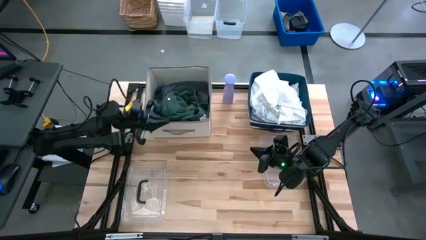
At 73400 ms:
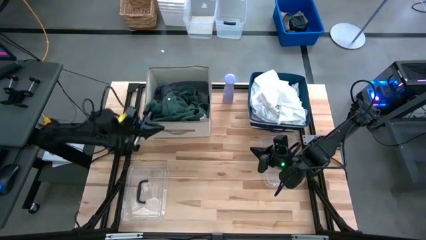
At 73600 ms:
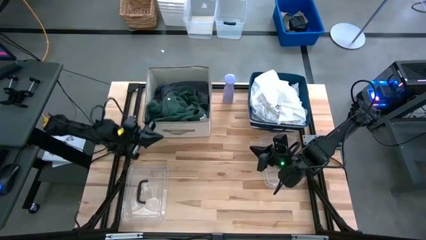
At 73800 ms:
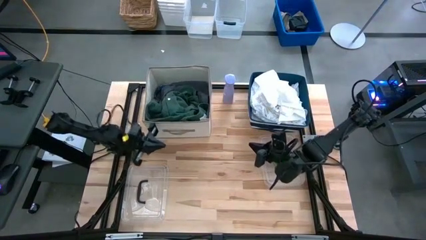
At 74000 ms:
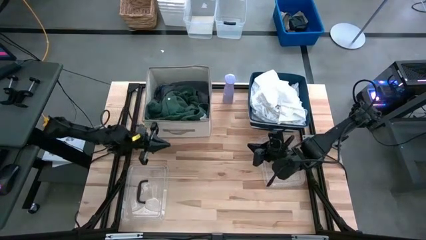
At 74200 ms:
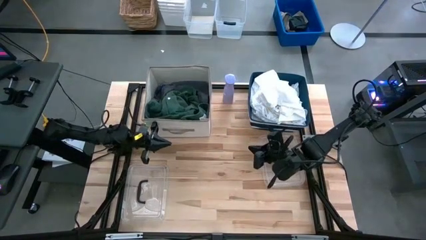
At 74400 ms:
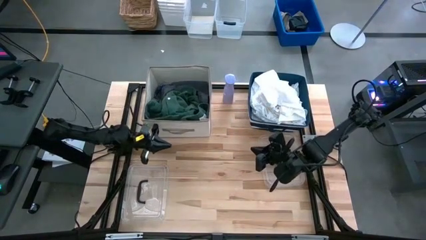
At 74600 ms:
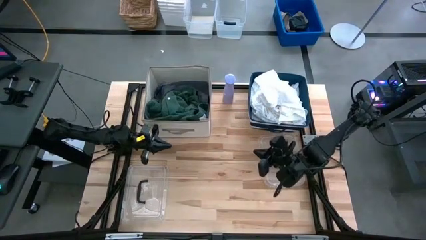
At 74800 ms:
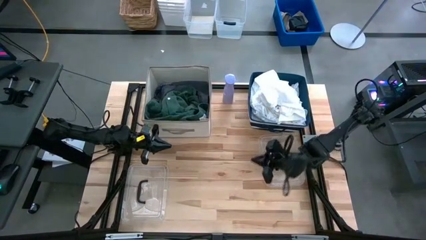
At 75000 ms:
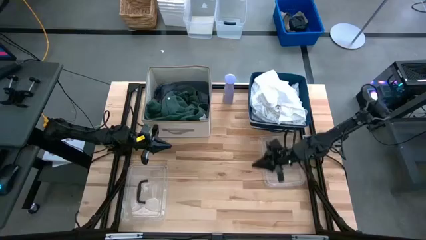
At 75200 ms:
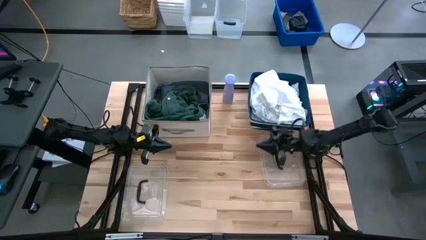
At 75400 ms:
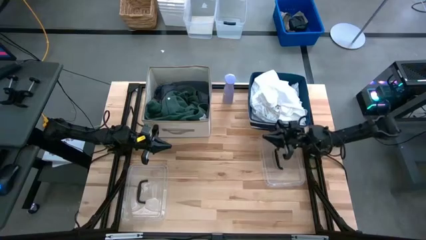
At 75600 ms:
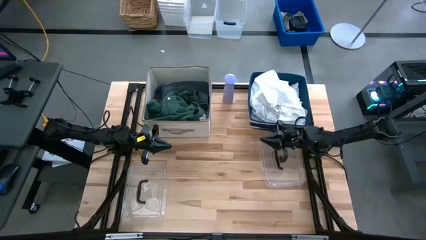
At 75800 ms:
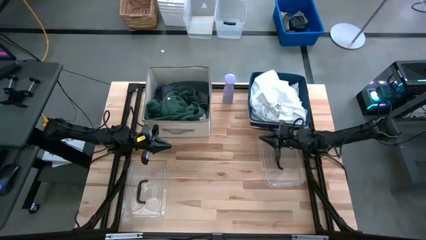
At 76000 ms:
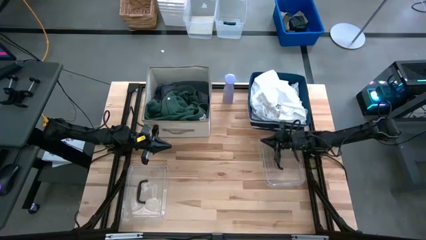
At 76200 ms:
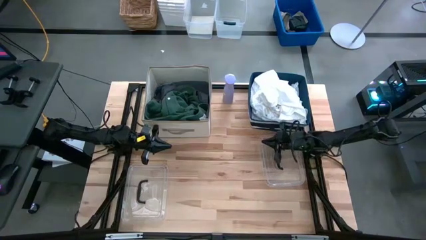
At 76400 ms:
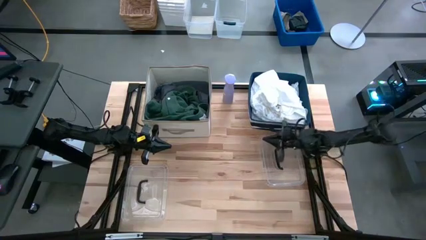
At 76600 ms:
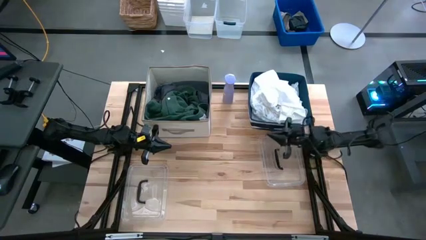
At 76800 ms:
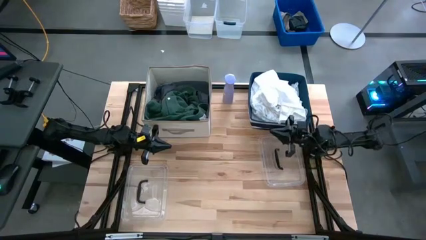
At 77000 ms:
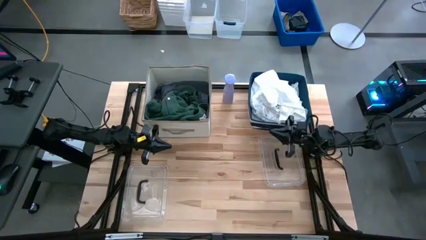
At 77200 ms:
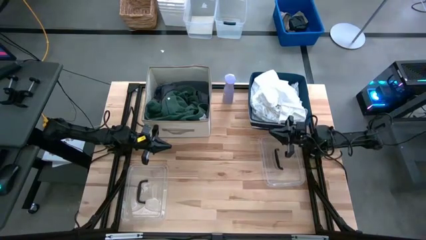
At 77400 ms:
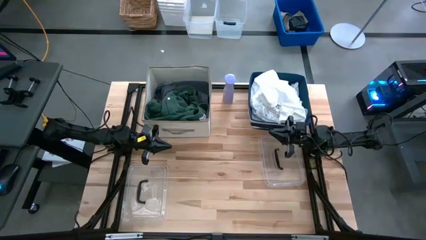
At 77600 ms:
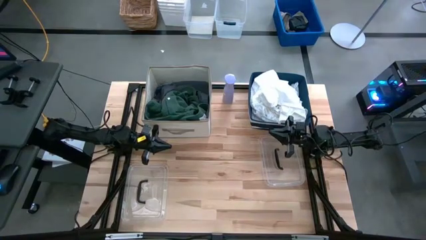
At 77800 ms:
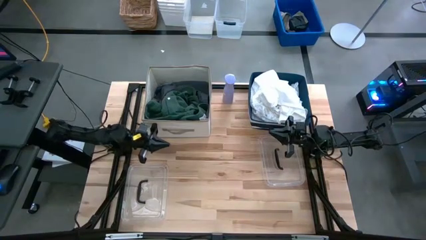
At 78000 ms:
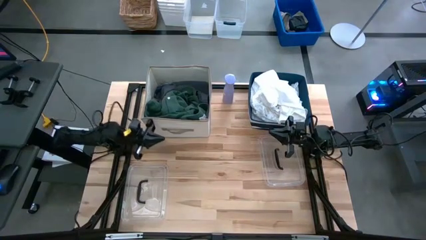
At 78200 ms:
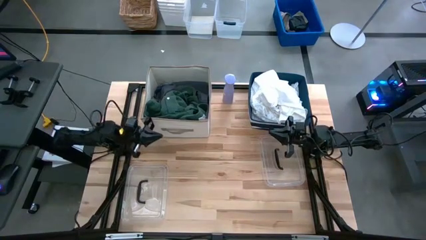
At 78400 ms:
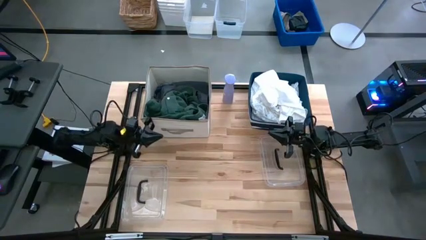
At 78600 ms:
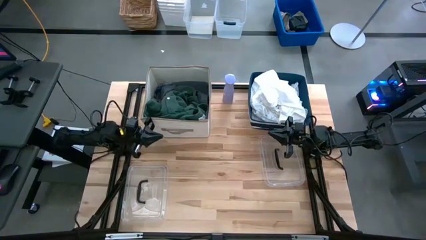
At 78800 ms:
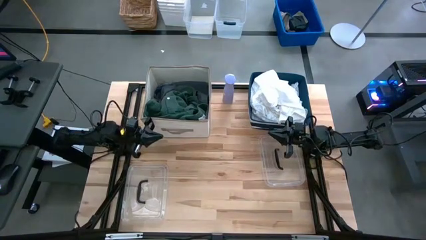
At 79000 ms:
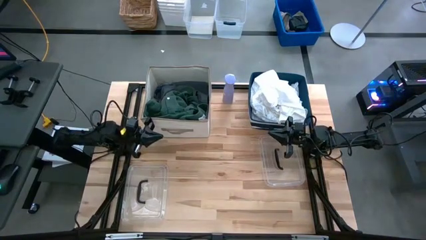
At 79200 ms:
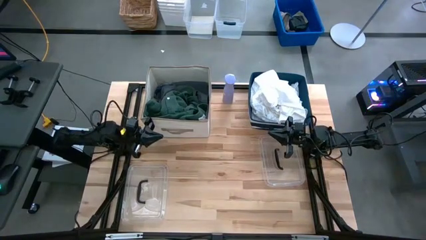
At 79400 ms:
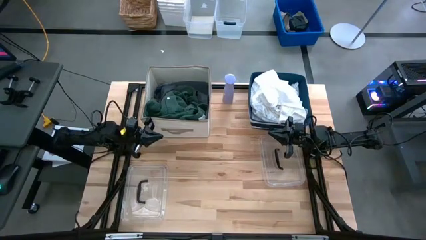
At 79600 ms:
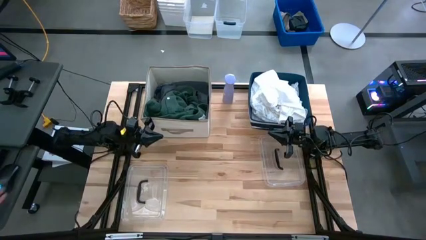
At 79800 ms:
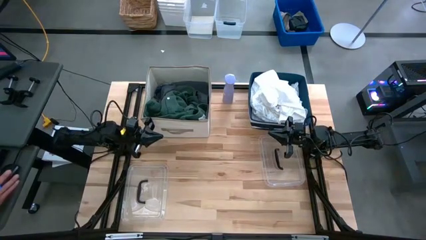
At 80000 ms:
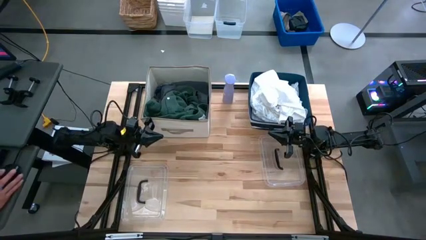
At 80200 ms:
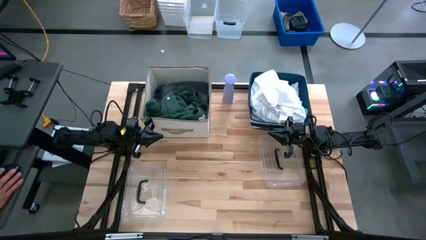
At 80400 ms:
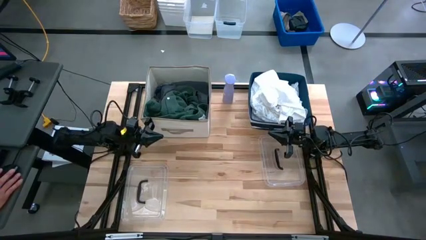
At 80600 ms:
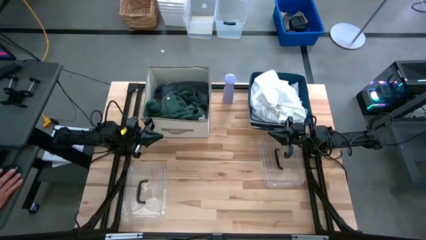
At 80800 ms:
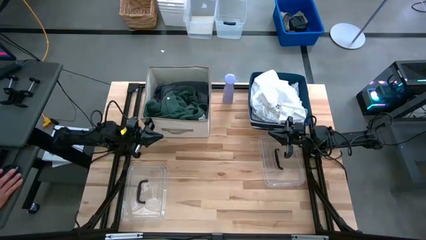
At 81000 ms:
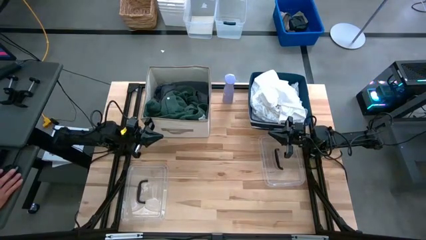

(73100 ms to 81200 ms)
Task: Sort clothes
Return to Home Position

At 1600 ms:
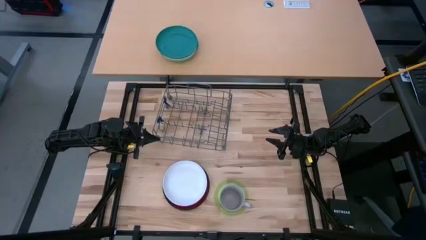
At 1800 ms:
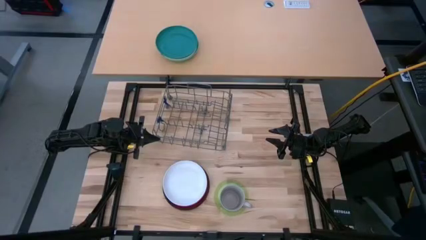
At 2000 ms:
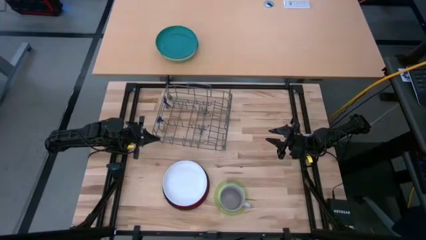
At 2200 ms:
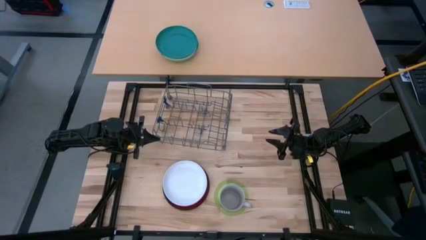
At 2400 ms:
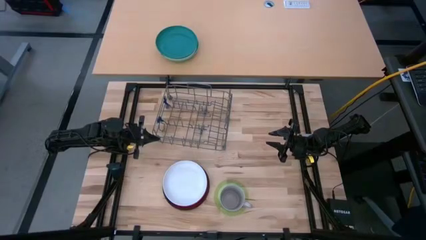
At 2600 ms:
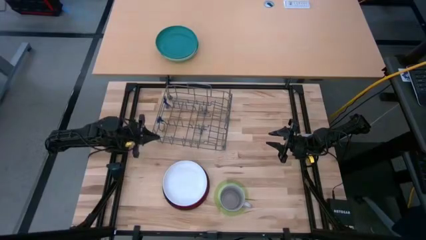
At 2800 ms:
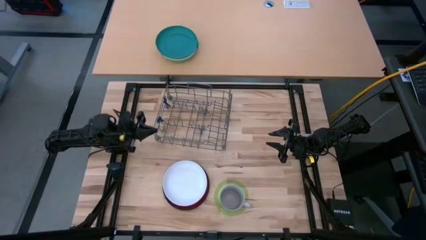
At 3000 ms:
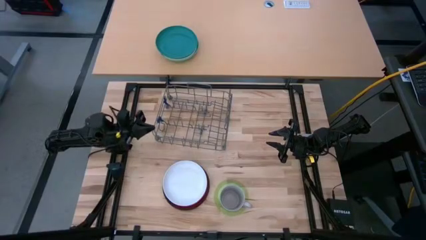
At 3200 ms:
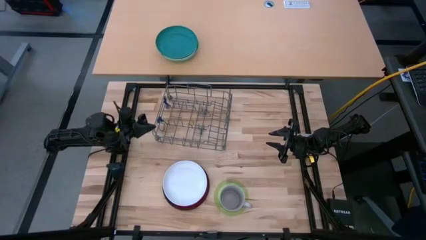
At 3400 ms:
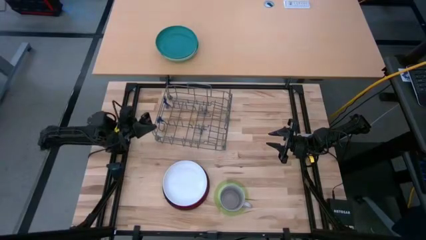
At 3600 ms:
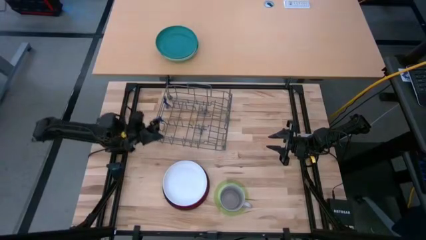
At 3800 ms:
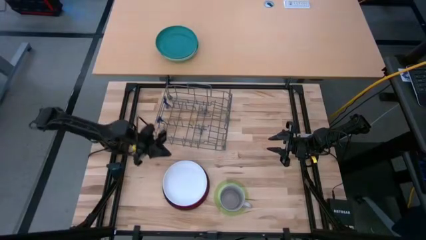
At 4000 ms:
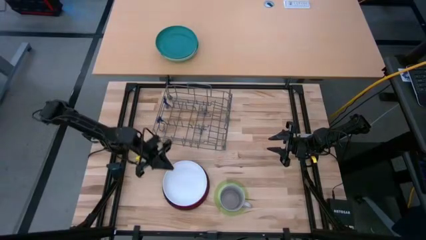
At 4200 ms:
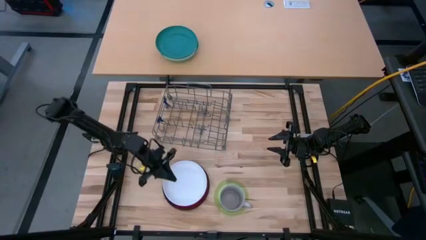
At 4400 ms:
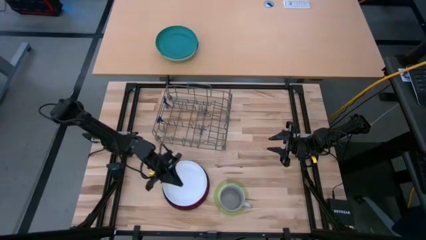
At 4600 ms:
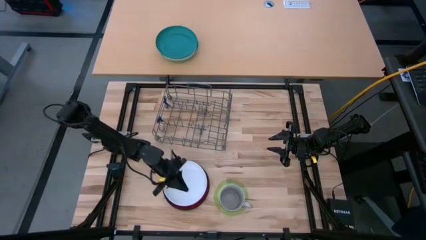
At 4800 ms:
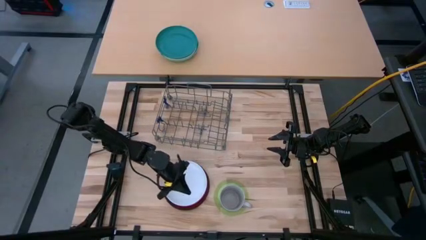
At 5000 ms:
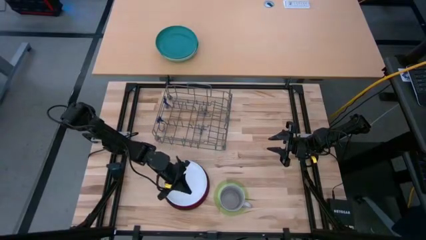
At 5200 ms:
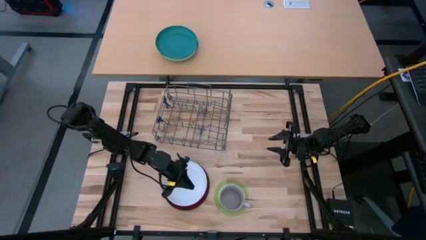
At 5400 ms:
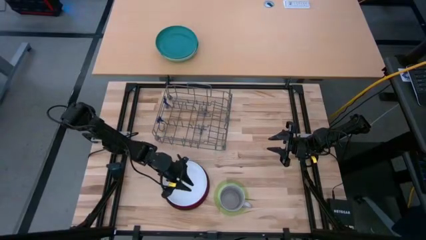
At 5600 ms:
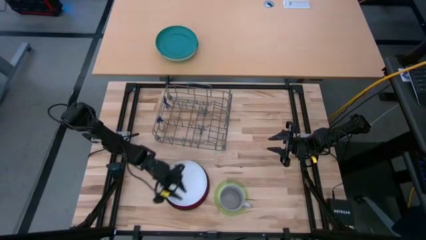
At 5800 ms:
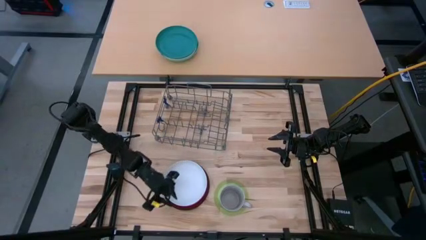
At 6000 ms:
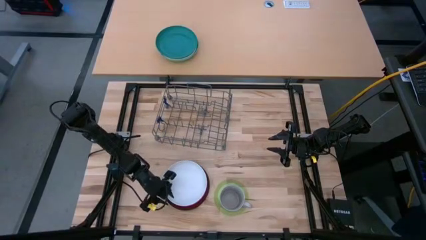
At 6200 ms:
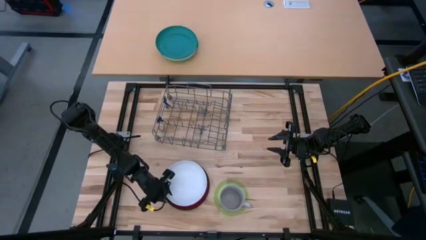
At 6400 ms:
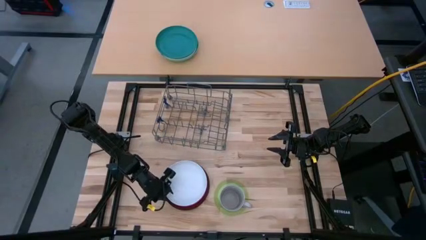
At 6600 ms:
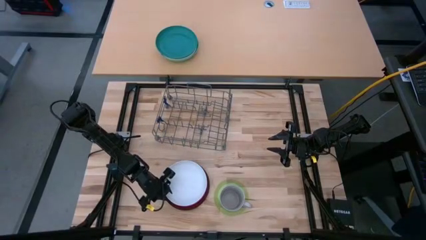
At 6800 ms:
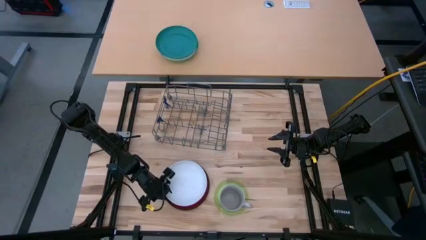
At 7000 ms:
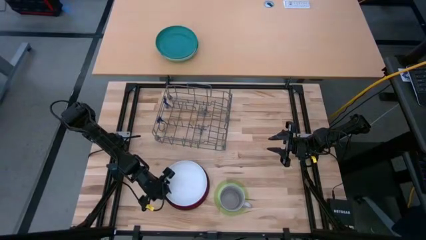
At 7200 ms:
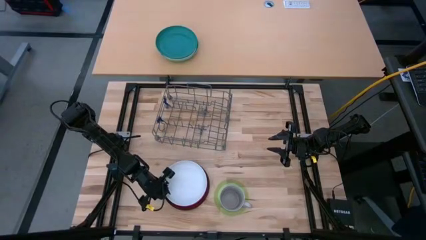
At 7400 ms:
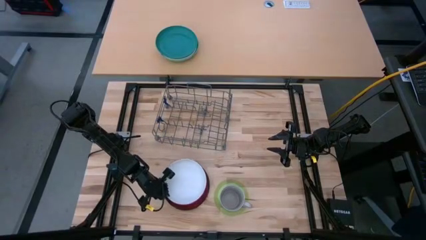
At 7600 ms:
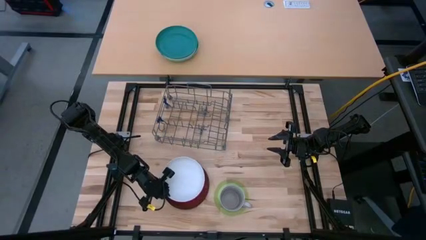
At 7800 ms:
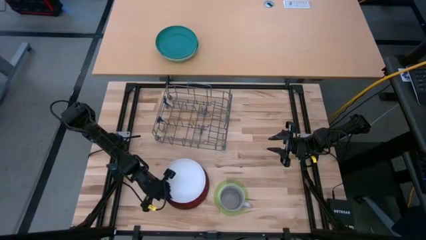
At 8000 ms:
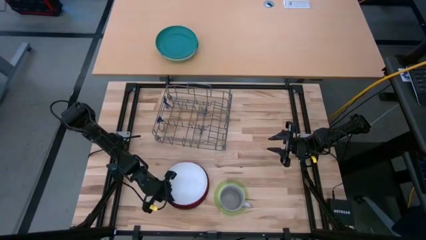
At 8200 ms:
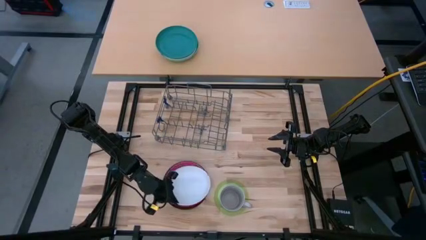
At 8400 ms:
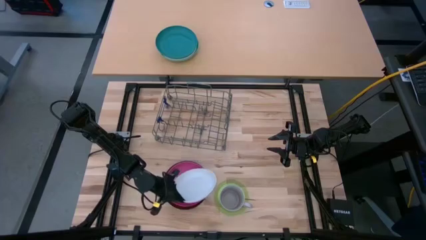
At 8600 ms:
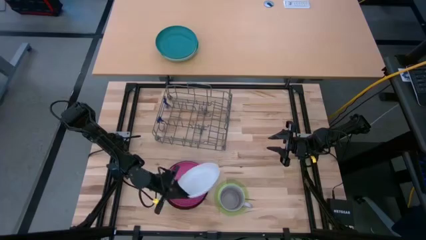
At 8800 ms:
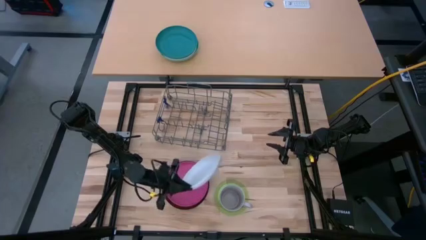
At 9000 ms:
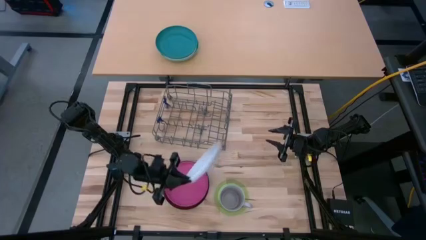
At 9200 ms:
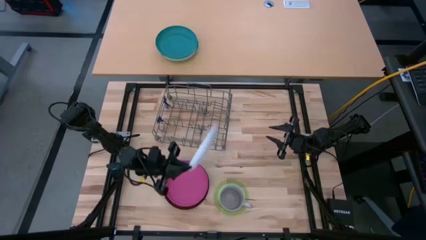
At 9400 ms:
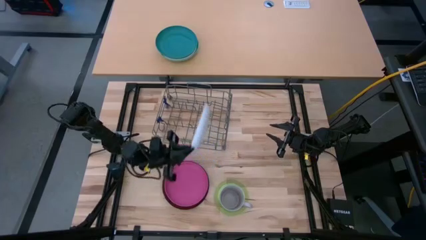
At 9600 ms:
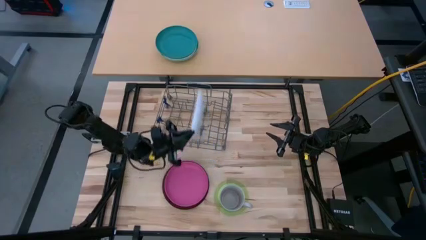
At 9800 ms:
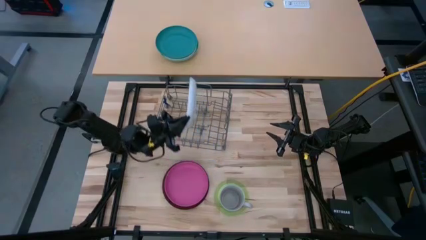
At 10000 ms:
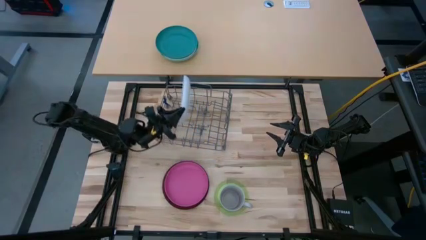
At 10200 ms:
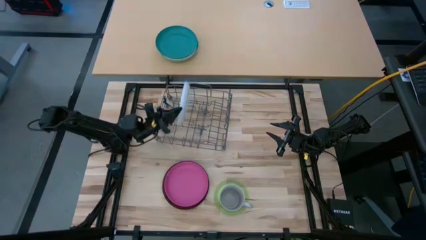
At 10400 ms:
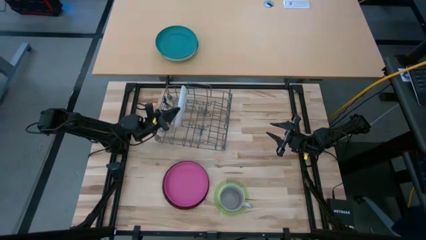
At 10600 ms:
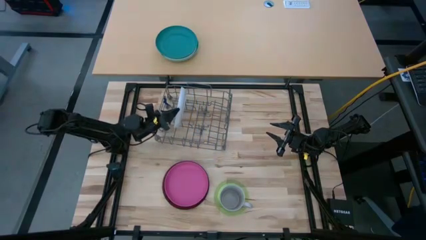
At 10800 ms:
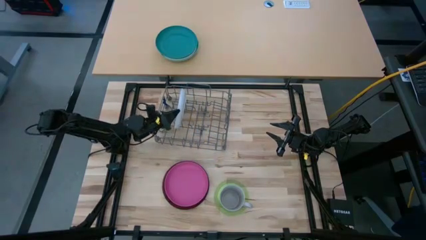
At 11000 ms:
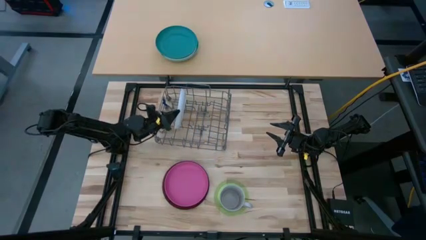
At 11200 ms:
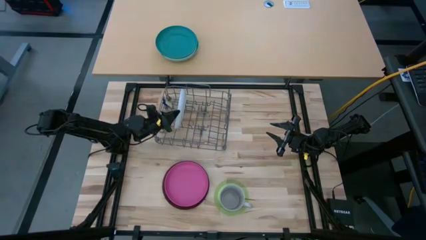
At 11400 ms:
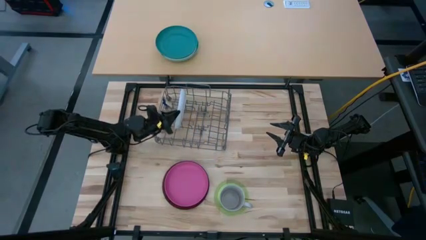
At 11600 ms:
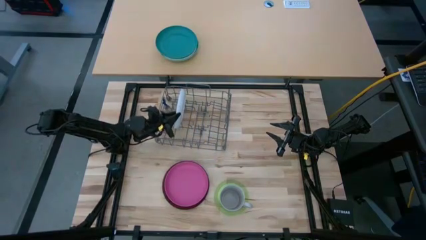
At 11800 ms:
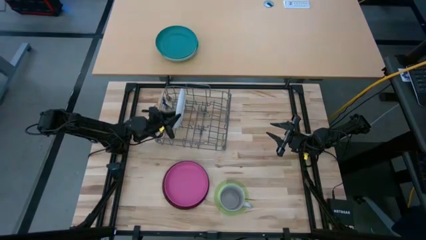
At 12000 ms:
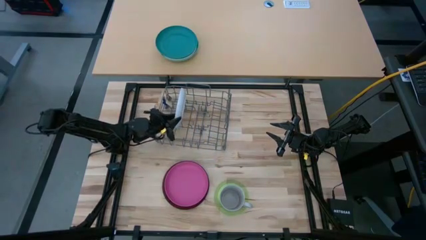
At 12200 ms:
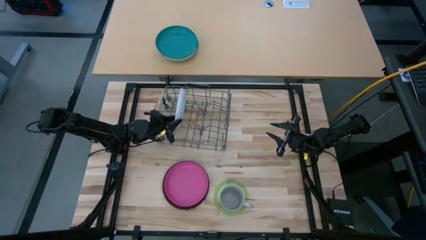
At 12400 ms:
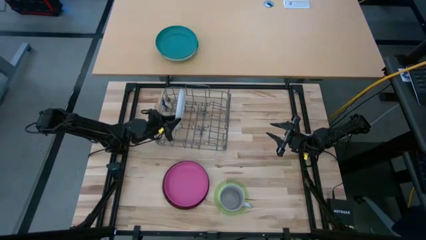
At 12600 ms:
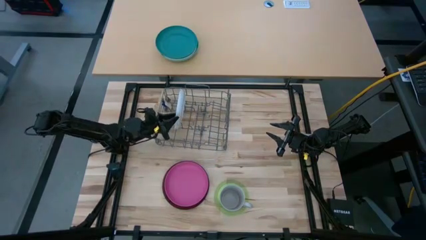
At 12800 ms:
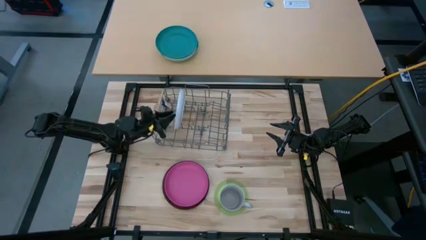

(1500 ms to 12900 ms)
Task: Sort dishes
Put the white plate in the dish rack
